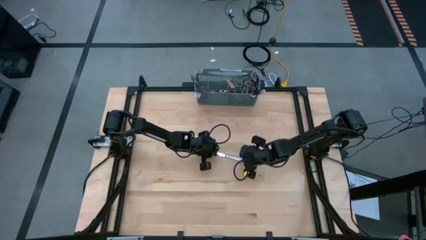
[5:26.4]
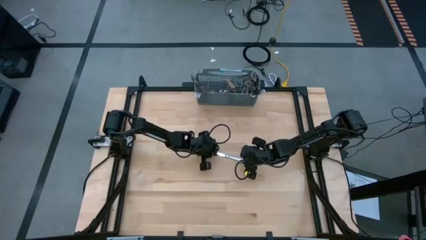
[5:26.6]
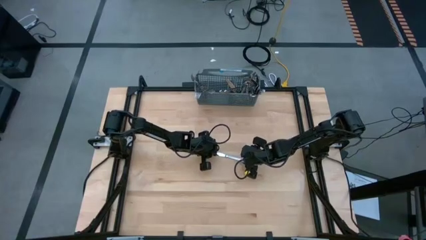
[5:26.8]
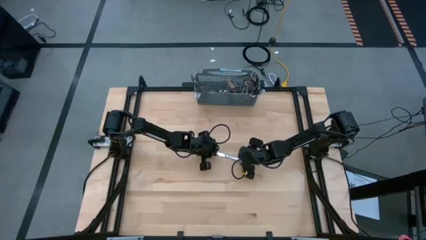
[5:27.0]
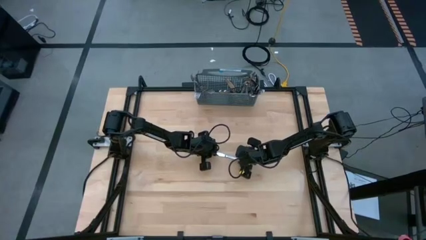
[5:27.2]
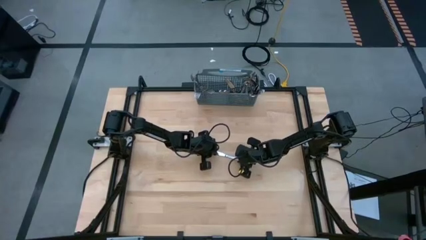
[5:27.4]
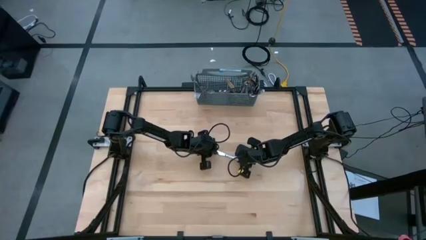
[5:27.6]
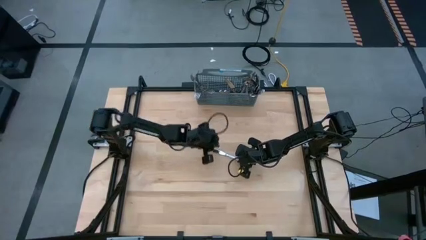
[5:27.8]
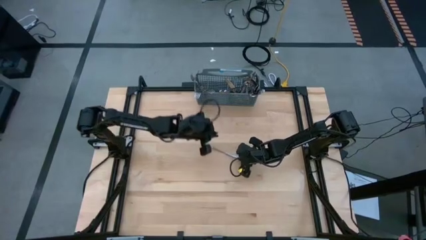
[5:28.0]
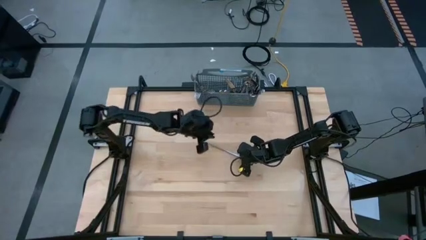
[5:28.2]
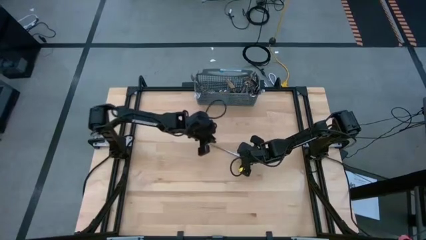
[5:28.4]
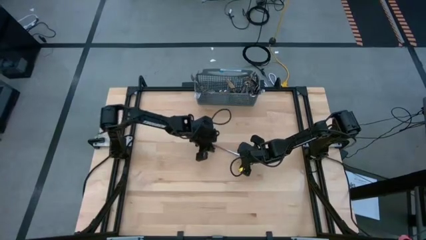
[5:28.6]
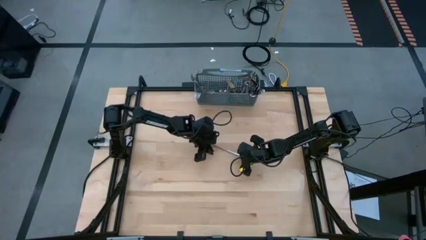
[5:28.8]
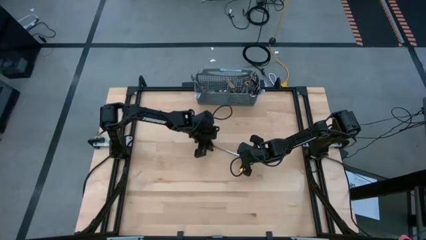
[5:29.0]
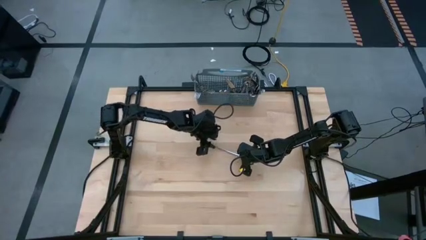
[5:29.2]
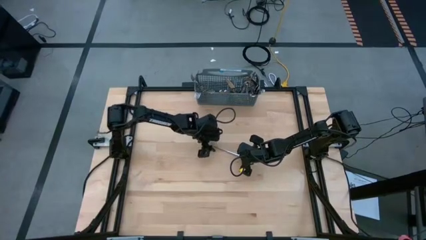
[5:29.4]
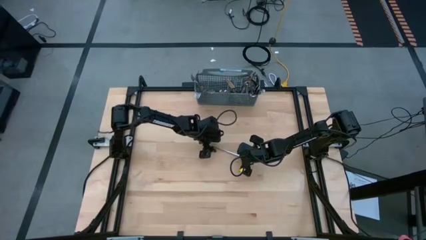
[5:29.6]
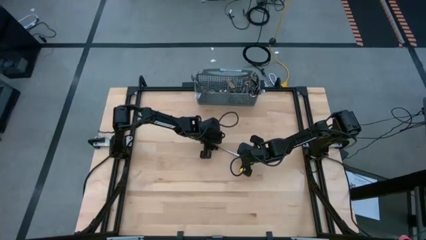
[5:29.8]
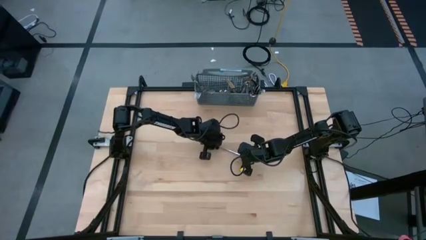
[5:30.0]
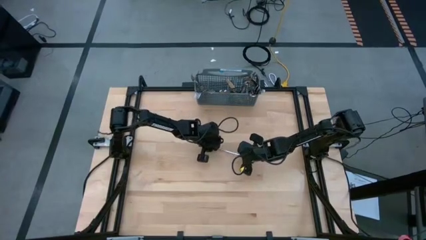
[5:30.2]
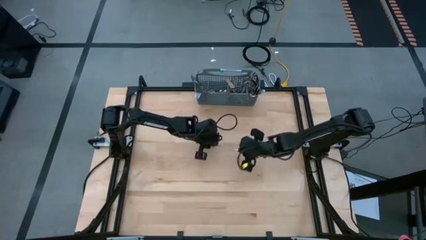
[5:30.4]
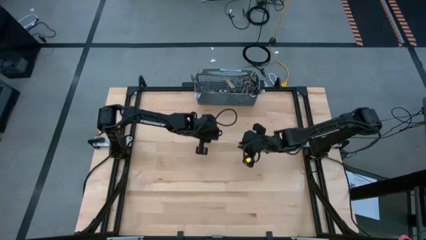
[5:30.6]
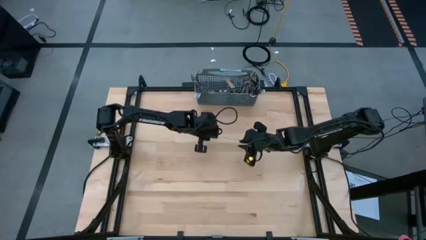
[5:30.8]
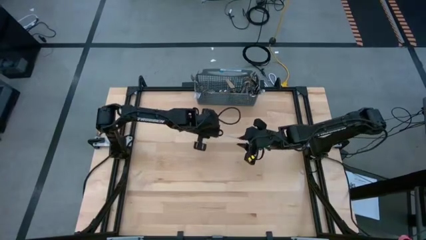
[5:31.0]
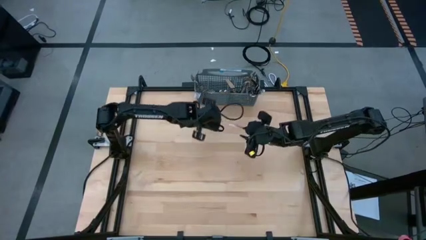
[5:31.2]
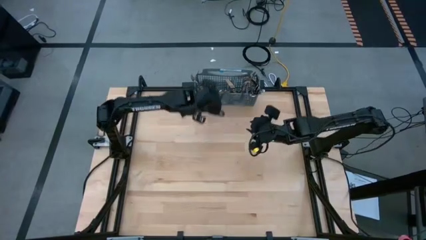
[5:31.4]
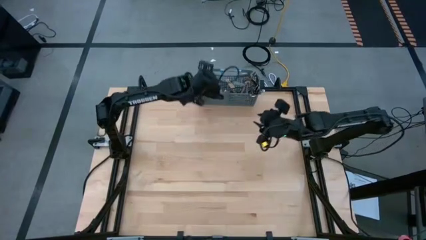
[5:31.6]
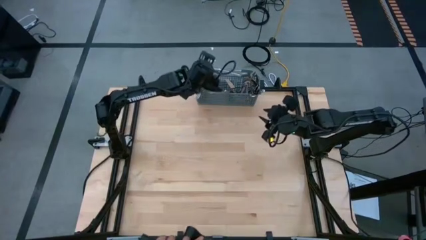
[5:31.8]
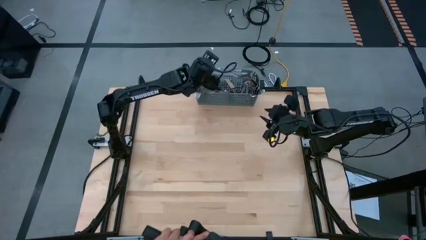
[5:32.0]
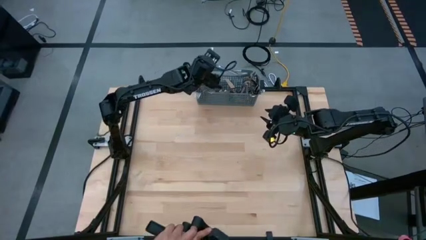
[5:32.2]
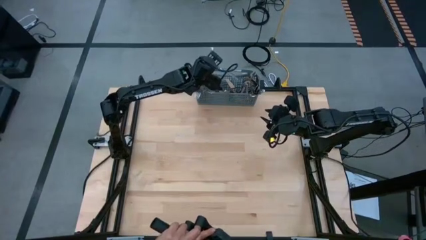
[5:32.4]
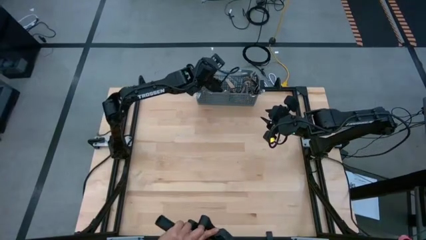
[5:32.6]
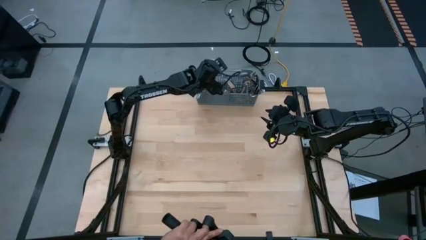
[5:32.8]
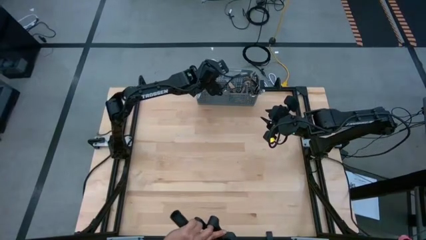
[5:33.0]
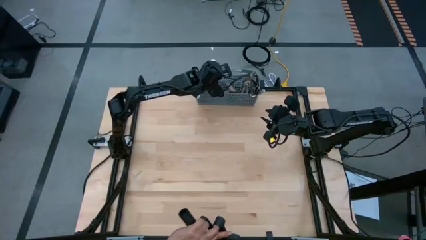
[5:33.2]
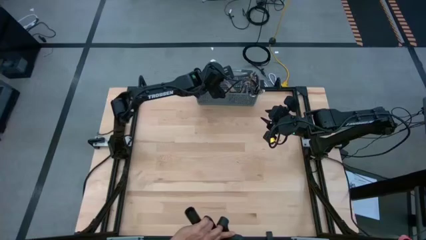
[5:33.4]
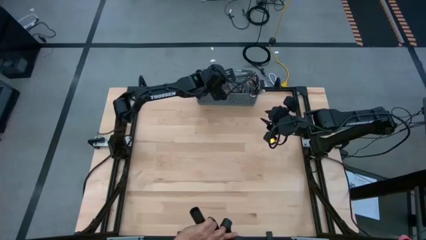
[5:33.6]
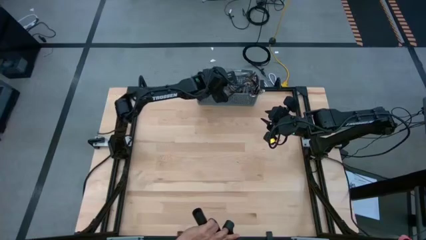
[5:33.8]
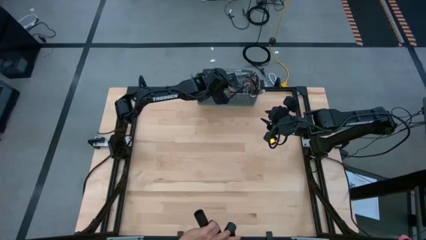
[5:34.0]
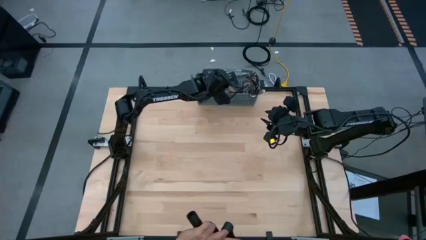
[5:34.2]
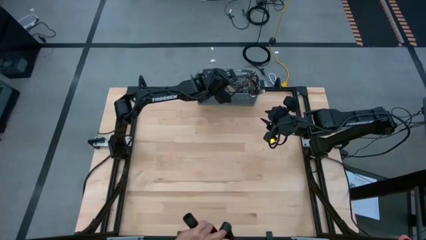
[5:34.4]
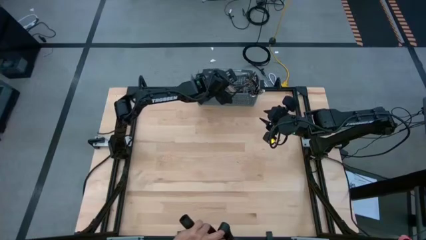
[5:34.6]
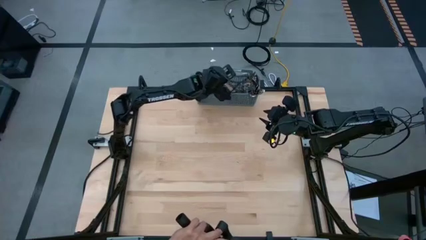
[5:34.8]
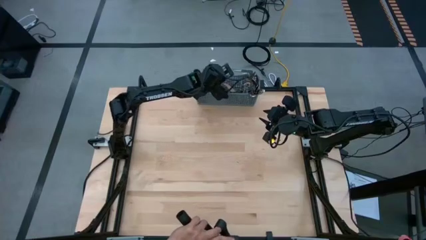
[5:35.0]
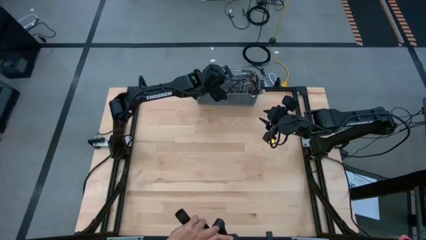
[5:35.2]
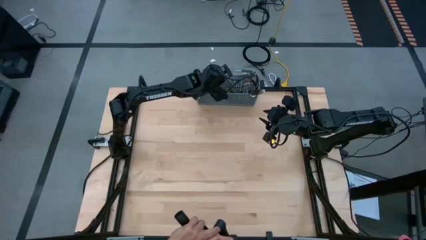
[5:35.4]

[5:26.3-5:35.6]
Task: Sort silverware
Put the silver table knife into the silverware organizer

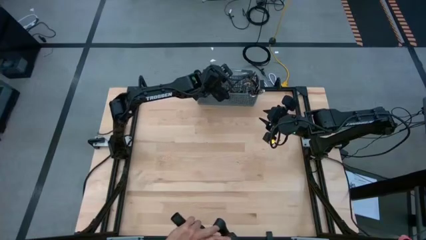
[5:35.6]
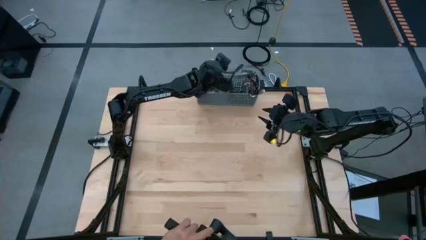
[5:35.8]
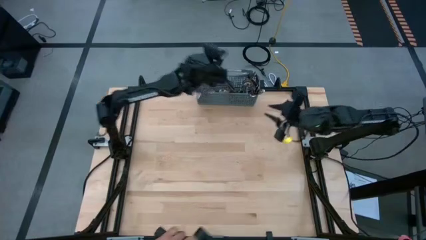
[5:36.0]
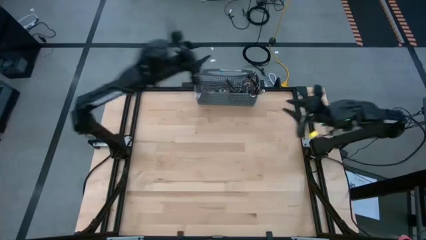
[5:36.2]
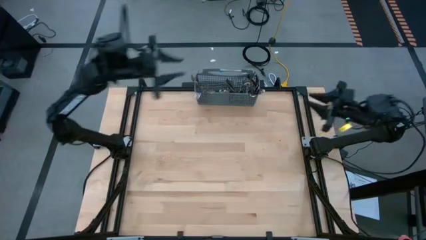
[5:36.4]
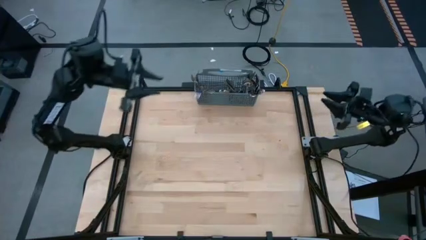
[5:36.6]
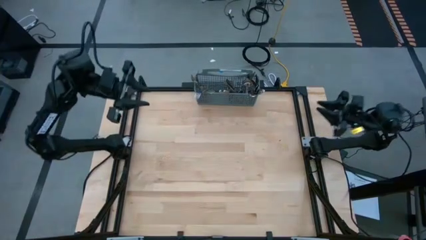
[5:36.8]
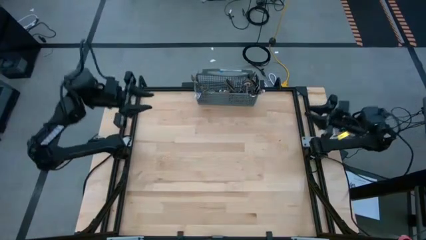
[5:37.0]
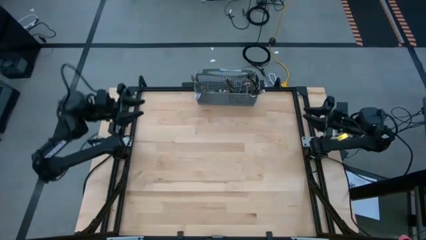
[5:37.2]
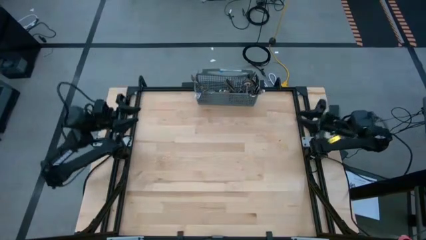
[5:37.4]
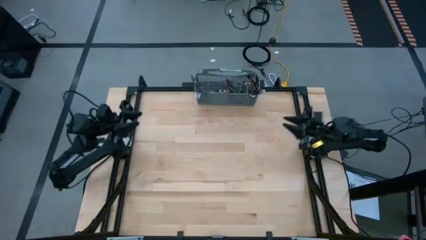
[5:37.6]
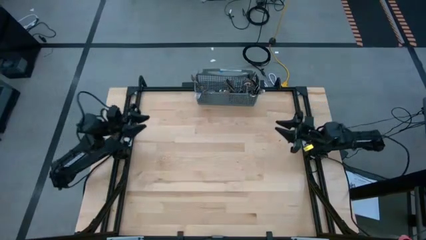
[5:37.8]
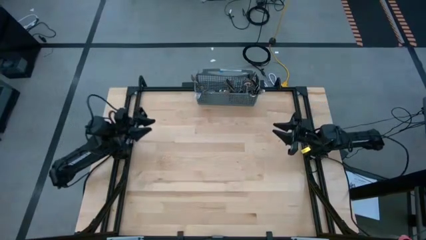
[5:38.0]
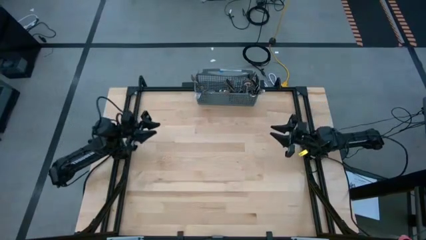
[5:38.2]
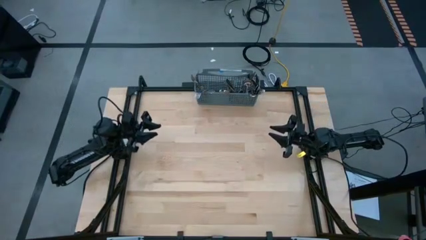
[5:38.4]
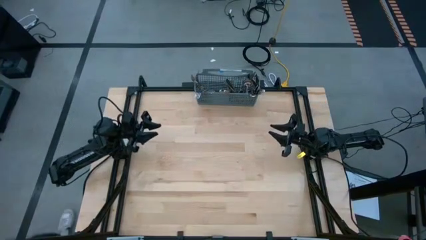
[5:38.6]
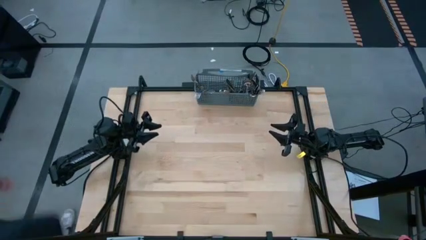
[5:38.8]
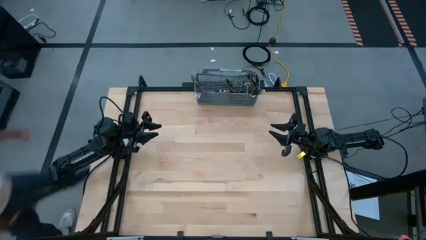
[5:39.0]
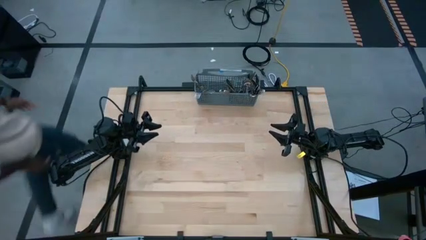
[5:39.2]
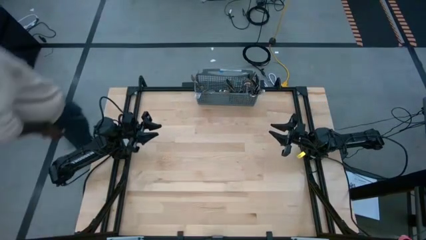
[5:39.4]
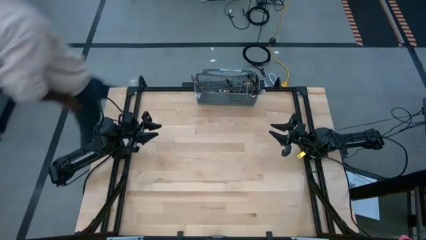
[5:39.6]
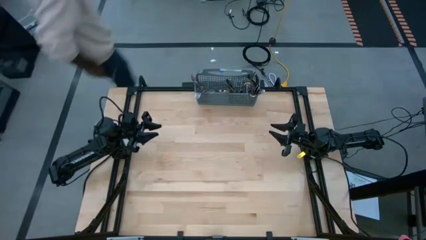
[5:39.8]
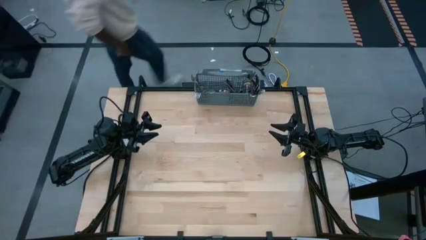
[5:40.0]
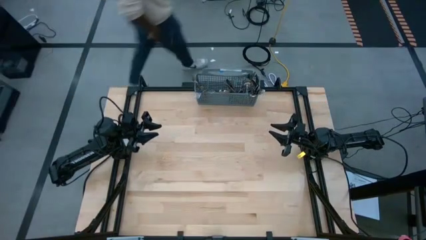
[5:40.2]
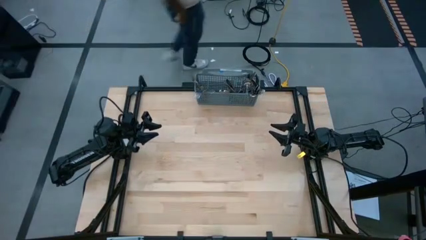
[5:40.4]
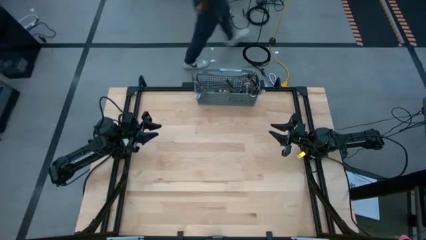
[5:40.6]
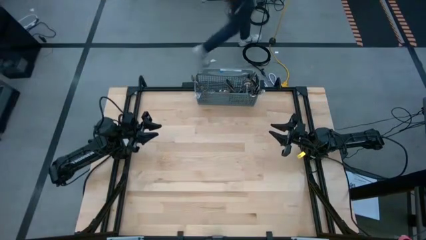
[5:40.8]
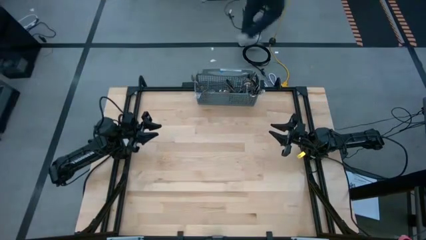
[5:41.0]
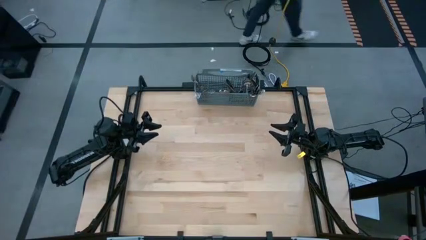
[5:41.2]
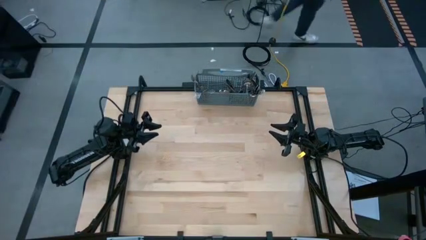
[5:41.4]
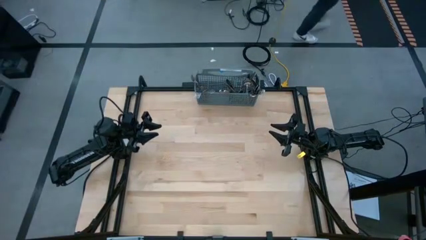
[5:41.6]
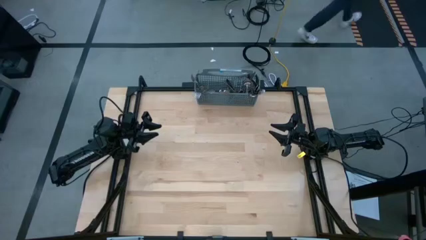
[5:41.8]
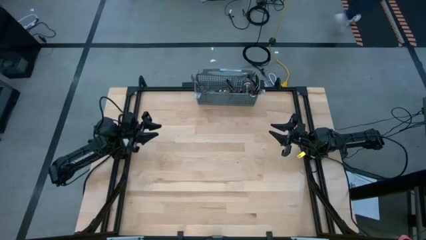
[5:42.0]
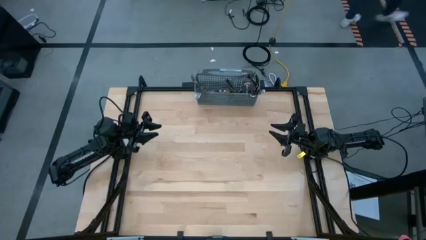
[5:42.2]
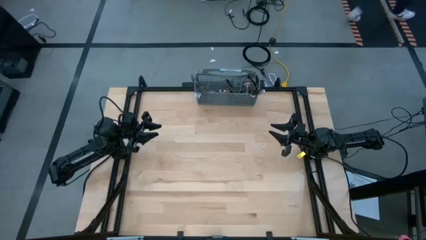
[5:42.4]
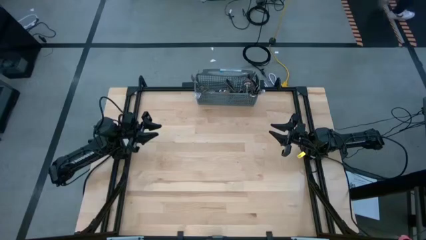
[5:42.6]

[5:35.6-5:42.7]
Return to Home Position

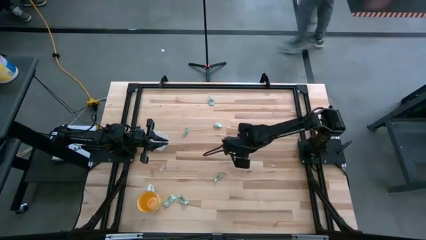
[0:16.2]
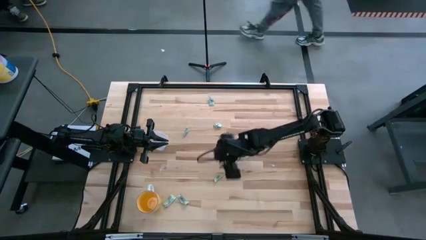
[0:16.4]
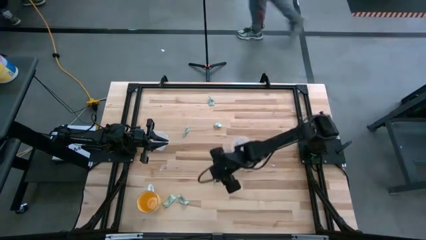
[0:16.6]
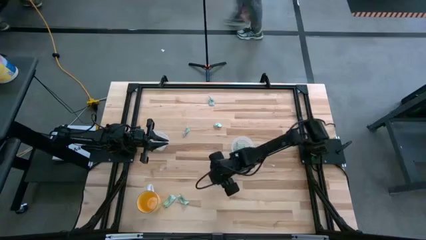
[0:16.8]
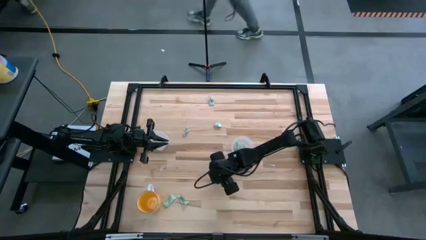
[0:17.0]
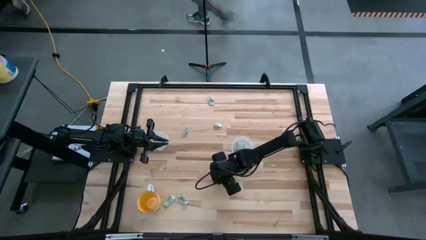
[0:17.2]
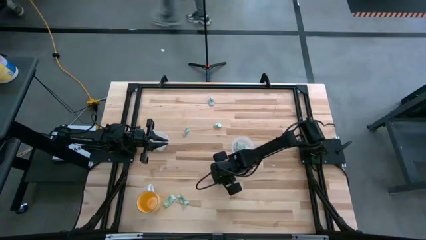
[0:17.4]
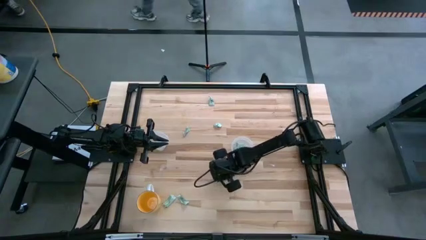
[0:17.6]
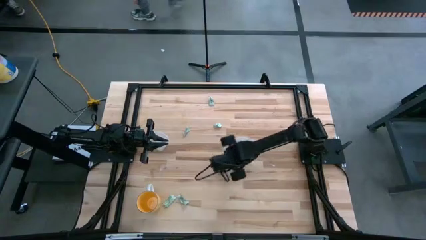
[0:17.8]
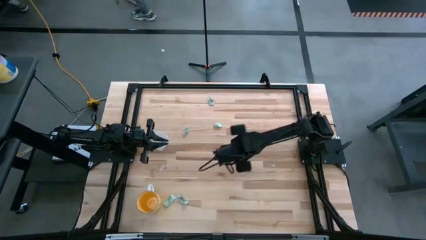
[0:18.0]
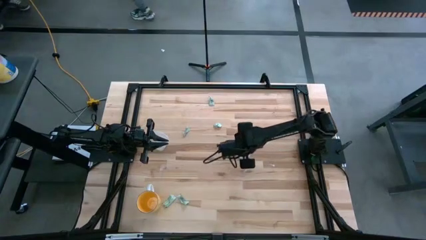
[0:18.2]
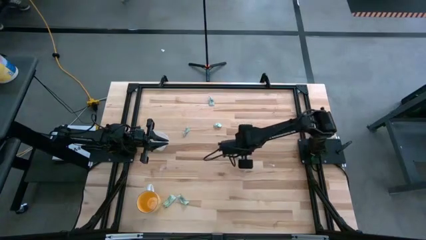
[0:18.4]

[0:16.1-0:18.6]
Task: Pick and place items into bin
Put the stevia pack into the right transparent bin
